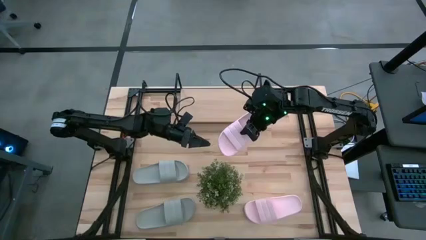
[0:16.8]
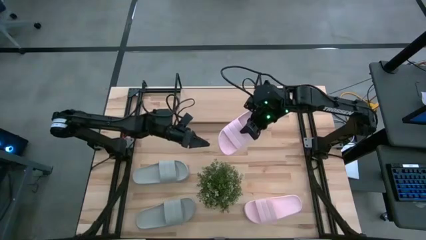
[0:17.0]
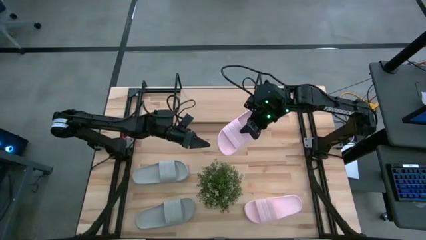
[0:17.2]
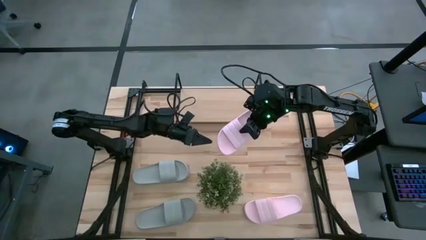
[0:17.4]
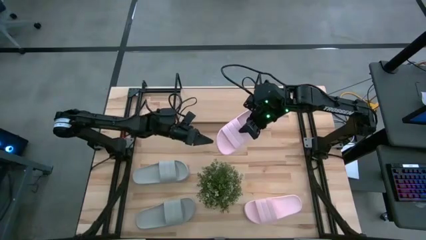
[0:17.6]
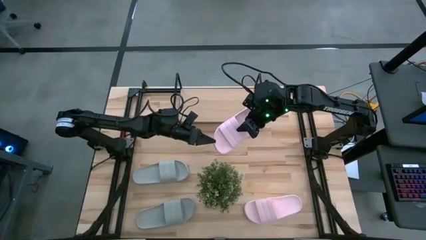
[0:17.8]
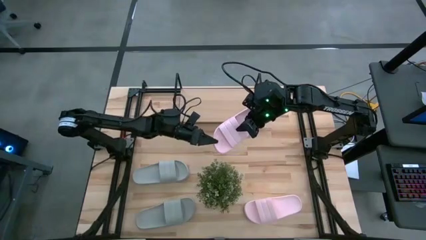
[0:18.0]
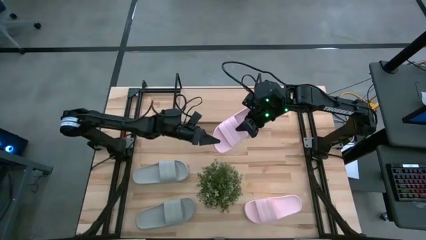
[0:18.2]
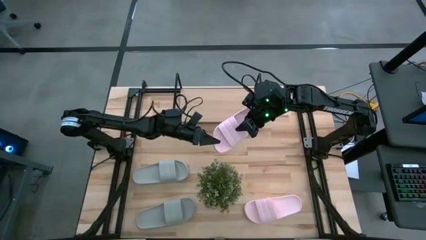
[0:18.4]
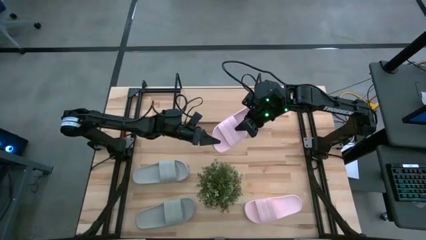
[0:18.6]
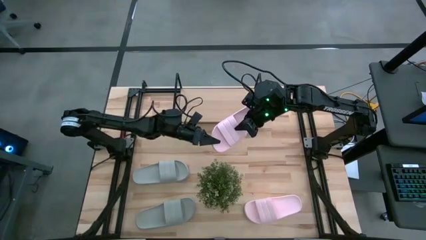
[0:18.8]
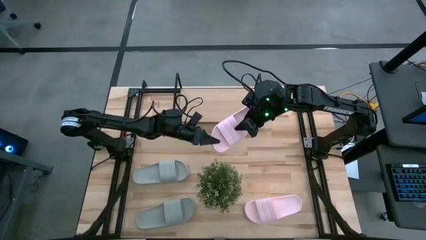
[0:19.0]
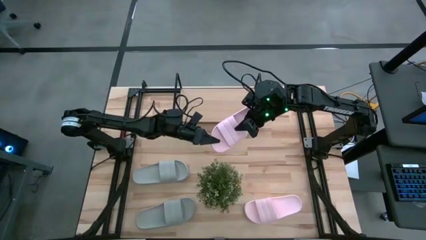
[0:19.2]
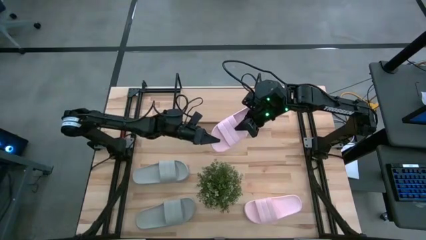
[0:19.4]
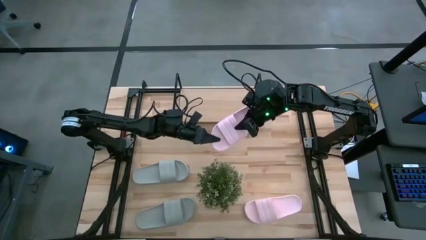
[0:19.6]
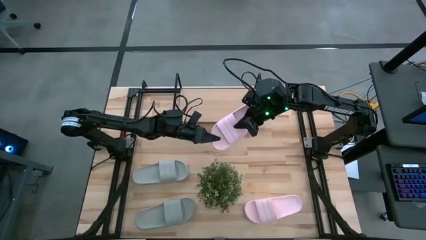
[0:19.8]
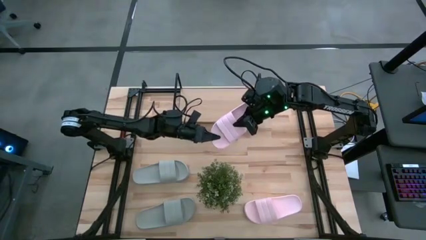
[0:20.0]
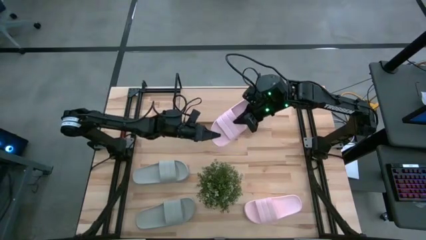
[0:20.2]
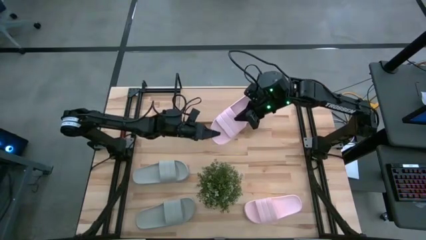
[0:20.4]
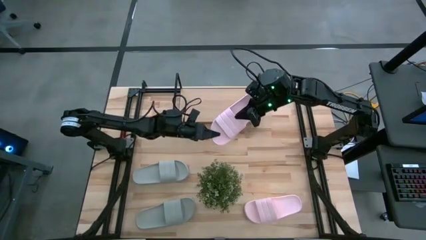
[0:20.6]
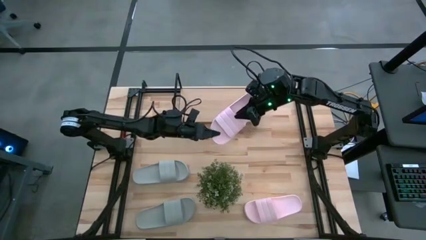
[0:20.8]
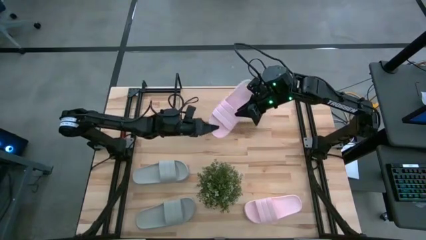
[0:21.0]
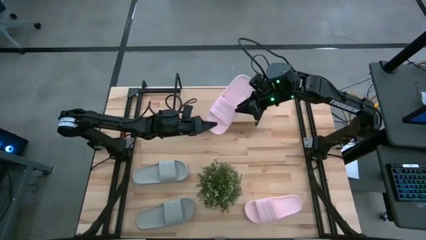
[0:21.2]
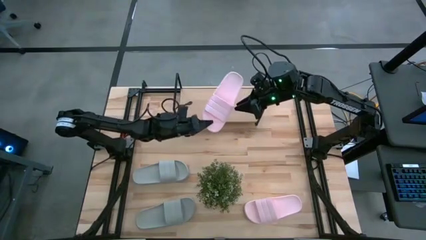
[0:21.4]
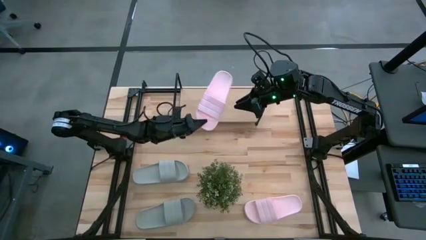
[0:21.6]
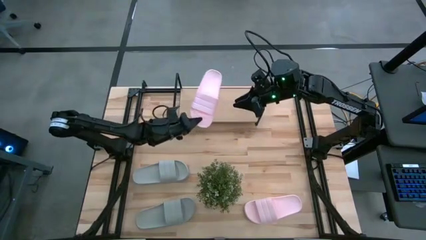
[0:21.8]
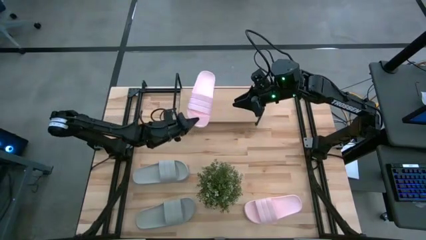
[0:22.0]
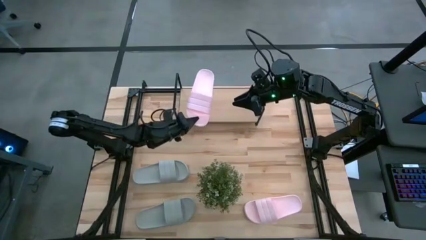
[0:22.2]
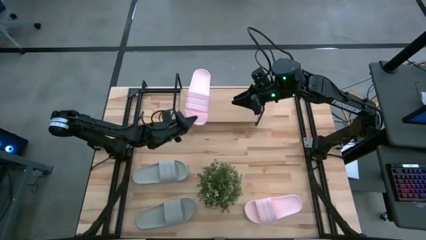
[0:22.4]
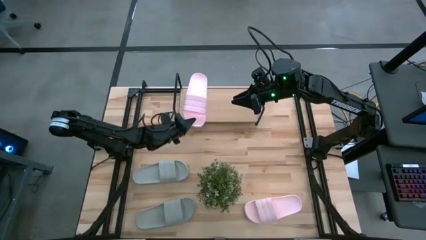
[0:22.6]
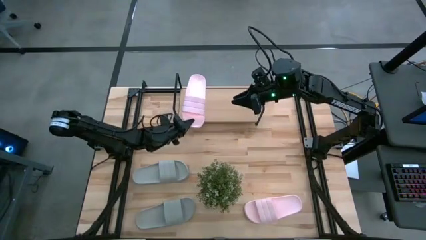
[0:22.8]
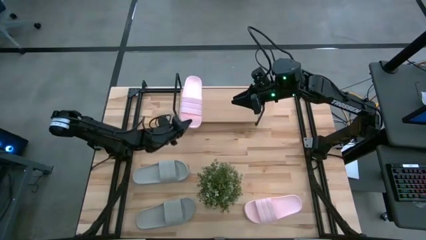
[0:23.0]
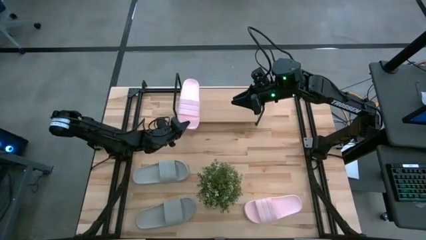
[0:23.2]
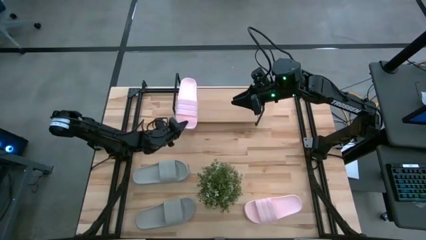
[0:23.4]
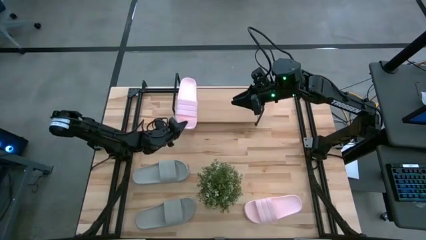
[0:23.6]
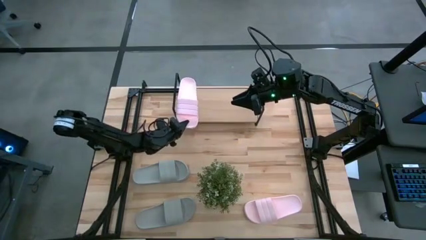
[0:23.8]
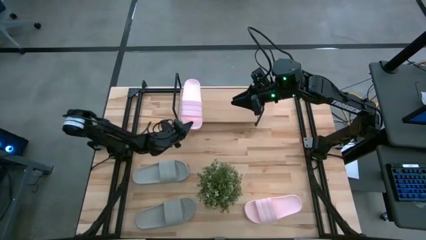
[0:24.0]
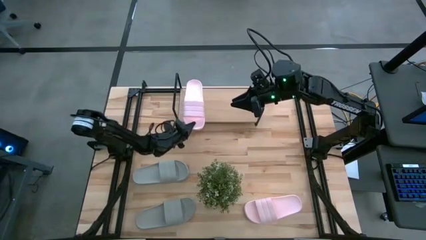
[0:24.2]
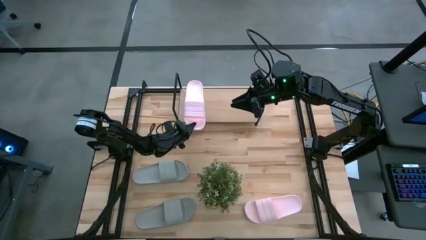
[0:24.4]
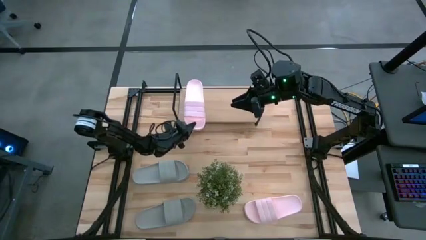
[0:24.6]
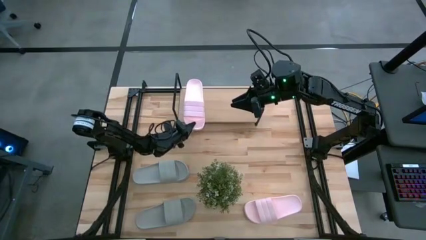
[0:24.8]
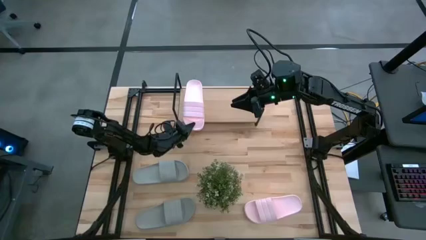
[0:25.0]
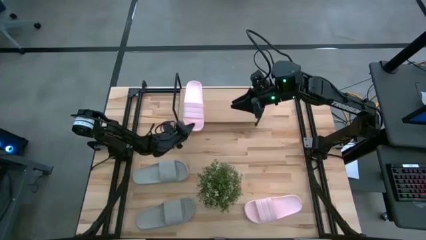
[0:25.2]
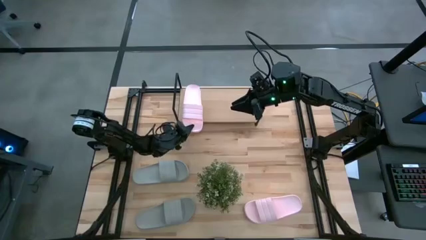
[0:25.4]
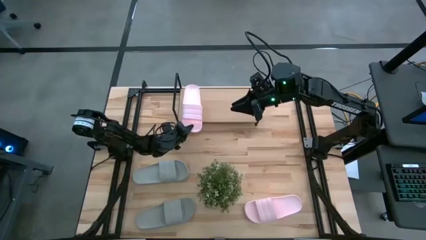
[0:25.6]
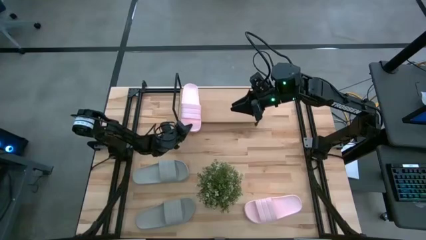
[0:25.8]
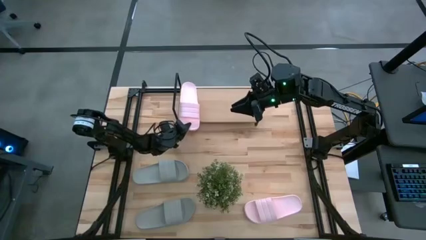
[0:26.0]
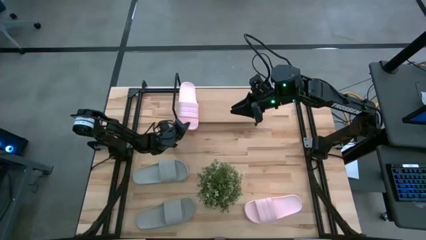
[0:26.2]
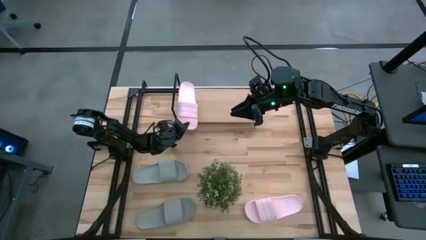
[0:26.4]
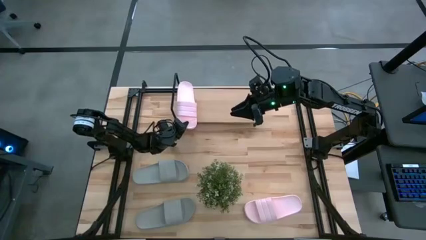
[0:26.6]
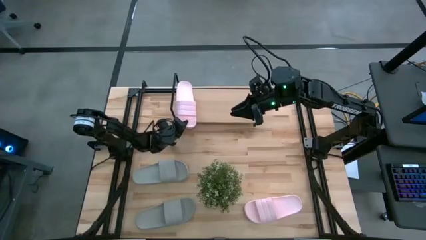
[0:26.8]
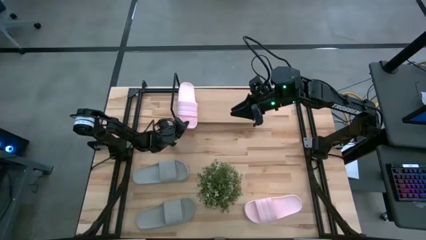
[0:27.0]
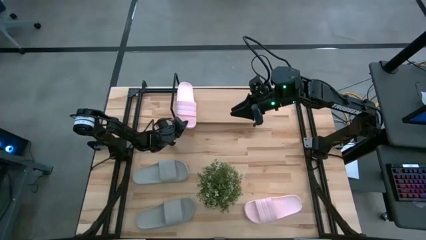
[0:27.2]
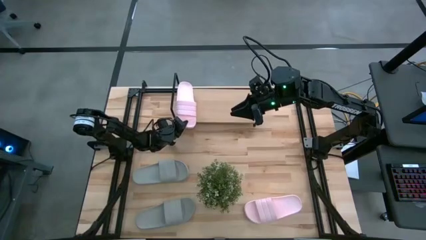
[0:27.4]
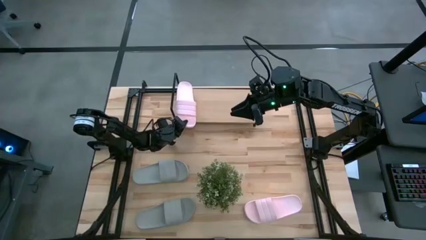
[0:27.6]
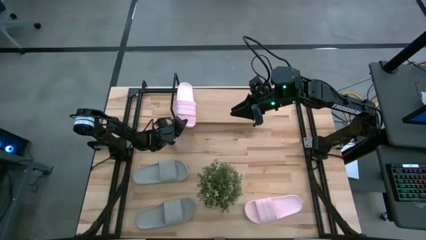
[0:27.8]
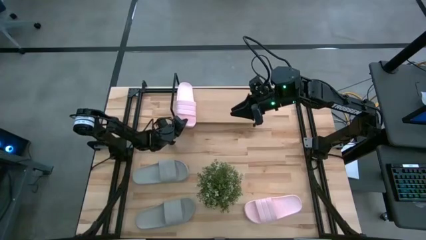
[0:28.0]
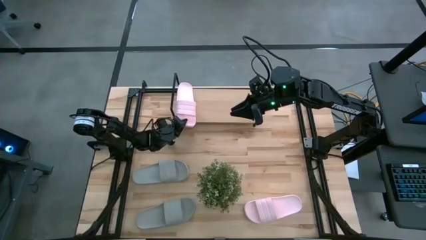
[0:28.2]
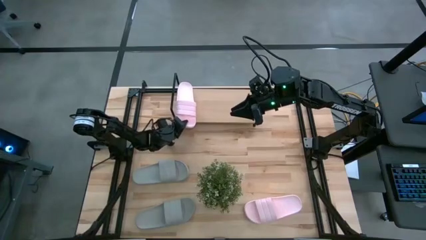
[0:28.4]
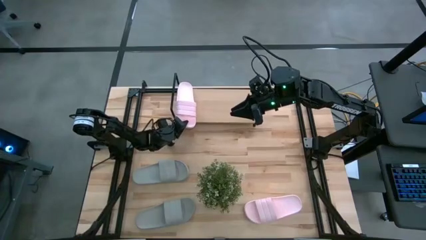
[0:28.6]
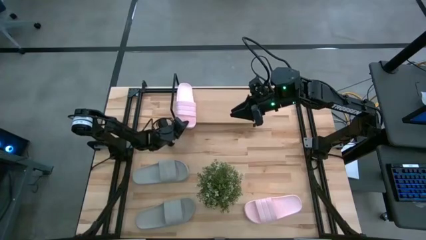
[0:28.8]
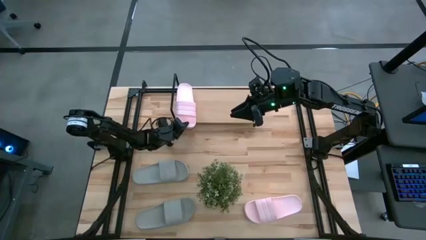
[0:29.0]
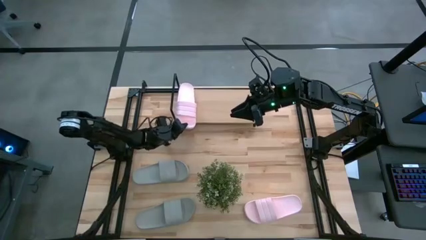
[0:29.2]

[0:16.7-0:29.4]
Task: Pick and place slides into the shelf
Put the top pink slides on the shelf

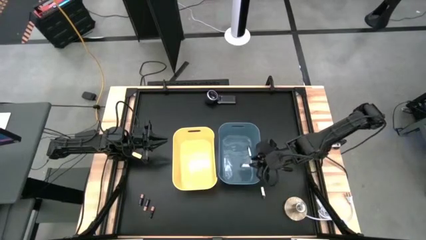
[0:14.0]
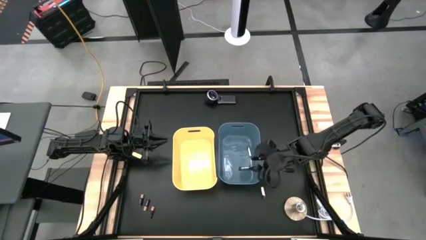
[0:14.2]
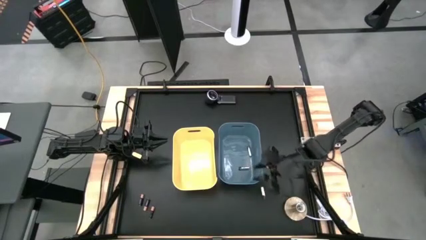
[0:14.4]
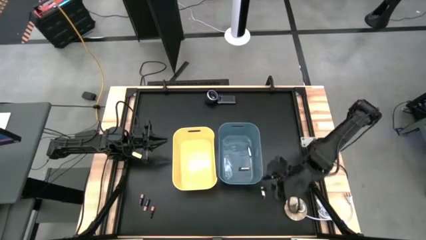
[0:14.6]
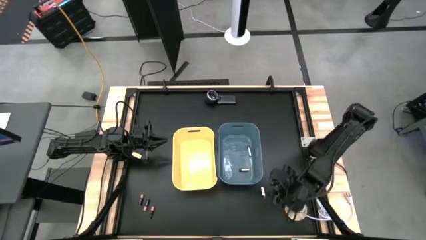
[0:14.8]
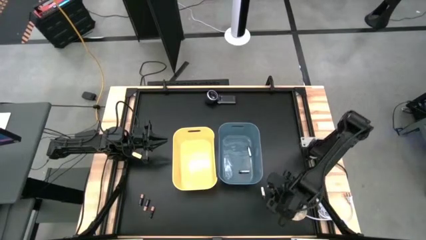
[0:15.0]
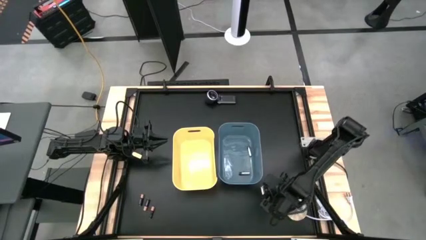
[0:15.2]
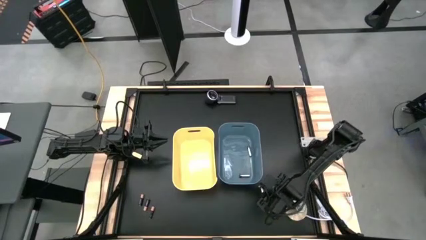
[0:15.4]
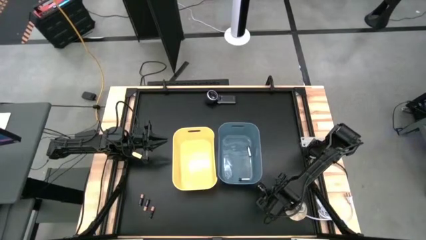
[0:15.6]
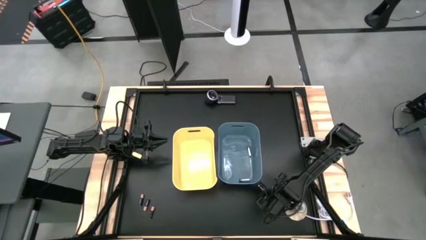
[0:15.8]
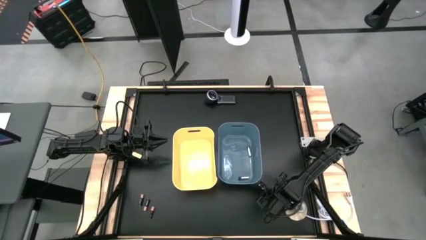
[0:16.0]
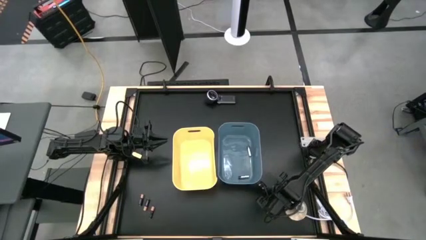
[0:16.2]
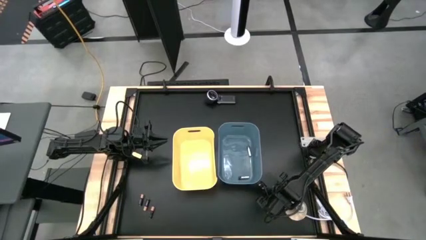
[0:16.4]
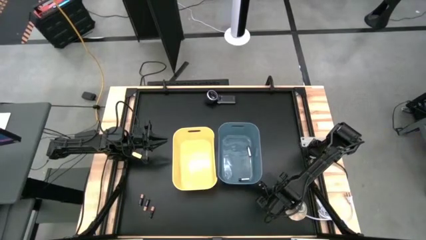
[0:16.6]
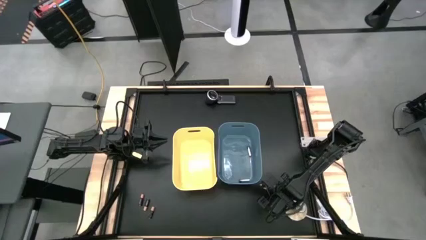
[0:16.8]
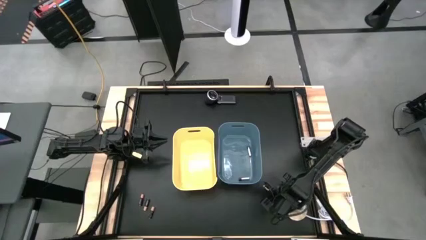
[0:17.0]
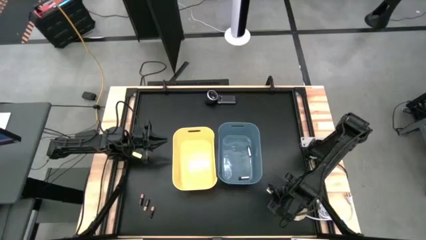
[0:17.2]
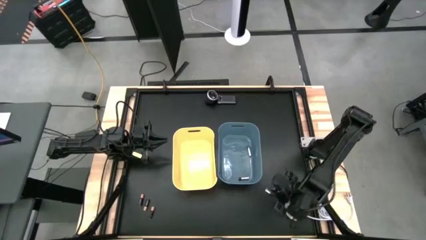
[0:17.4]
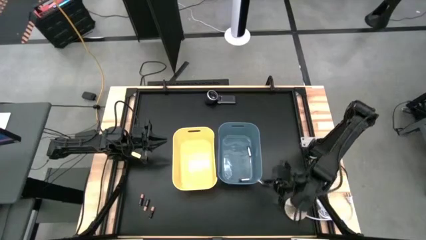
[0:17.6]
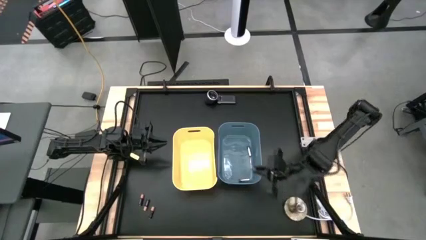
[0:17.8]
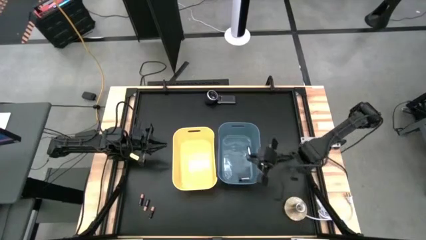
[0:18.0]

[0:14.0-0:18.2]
Task: Sort batteries
Put the silver battery into the blue bin
